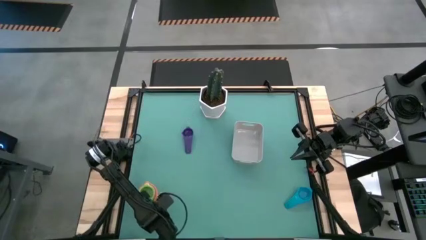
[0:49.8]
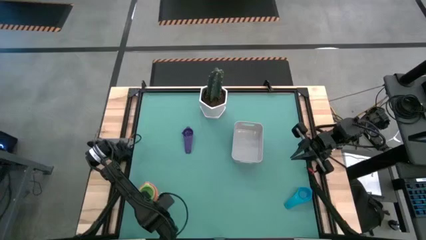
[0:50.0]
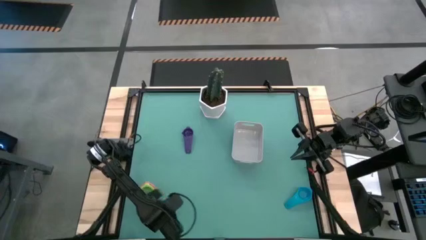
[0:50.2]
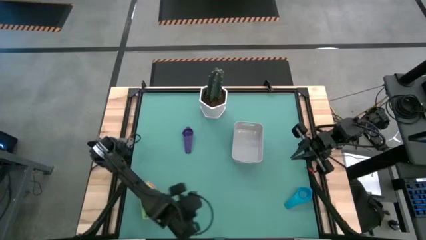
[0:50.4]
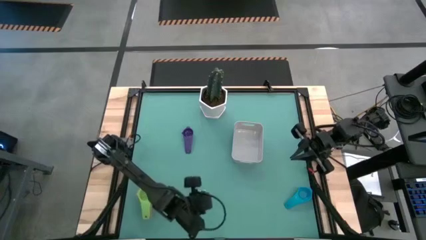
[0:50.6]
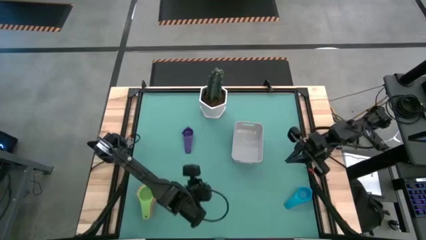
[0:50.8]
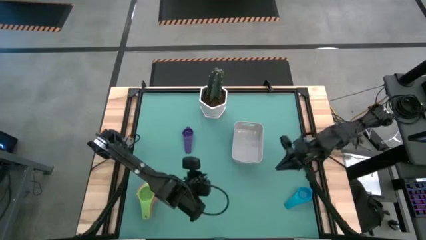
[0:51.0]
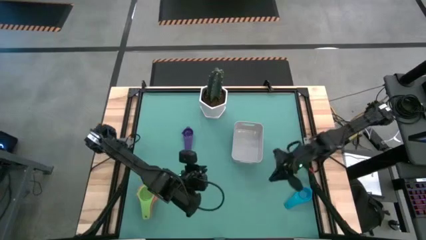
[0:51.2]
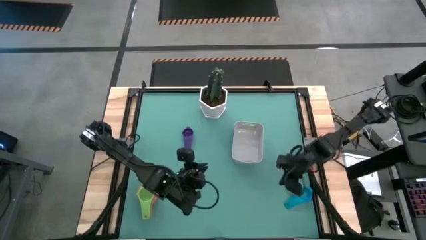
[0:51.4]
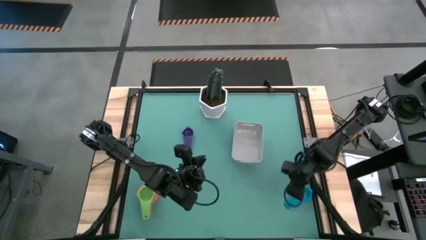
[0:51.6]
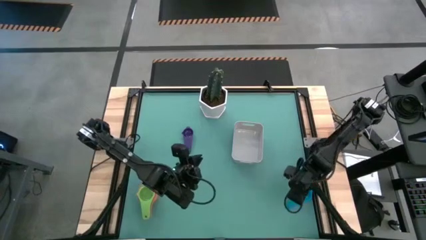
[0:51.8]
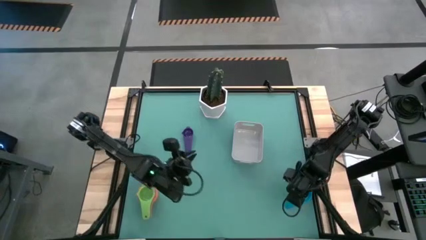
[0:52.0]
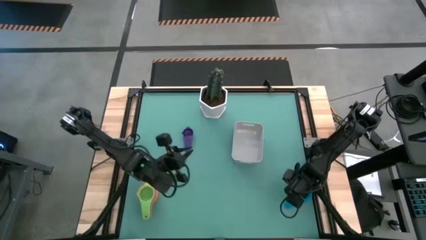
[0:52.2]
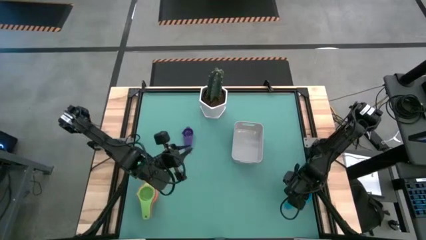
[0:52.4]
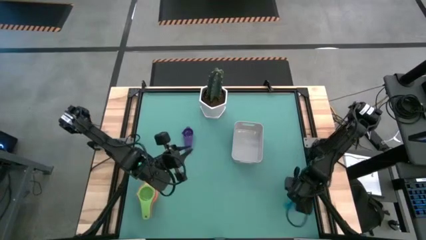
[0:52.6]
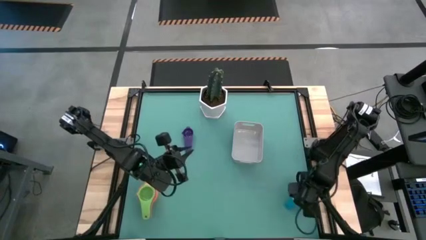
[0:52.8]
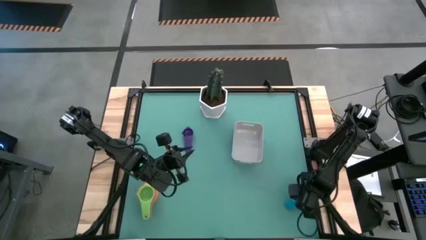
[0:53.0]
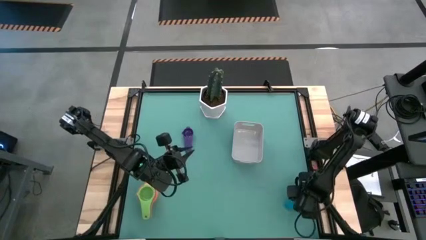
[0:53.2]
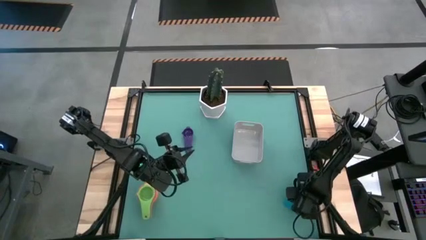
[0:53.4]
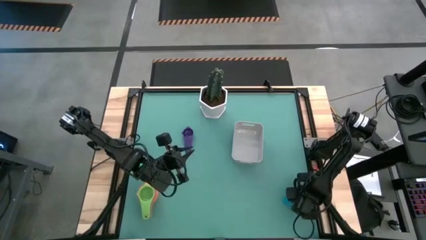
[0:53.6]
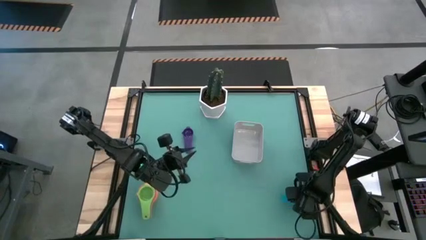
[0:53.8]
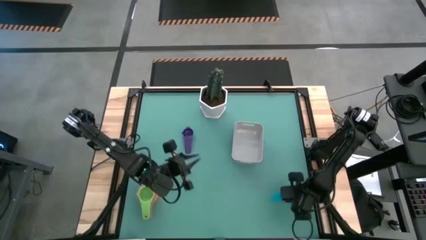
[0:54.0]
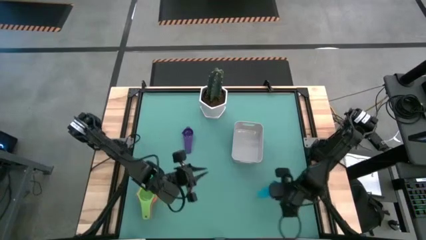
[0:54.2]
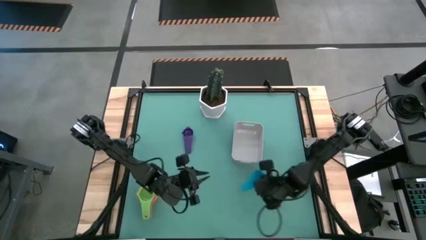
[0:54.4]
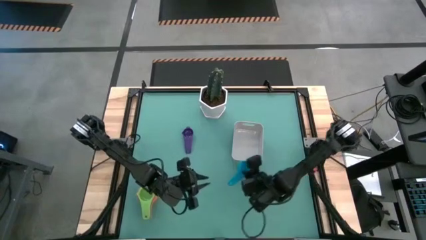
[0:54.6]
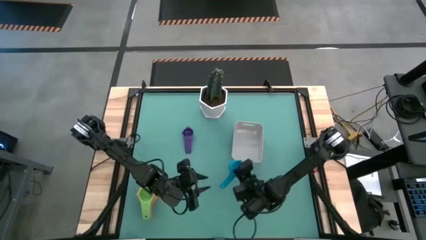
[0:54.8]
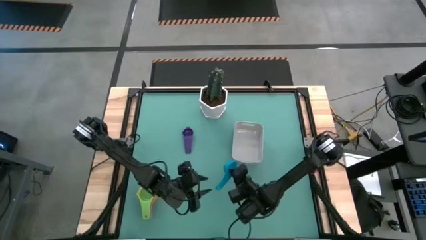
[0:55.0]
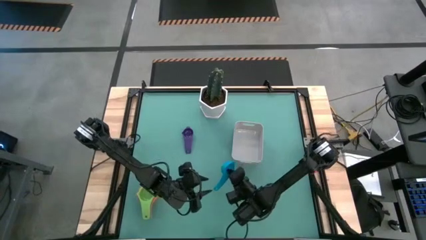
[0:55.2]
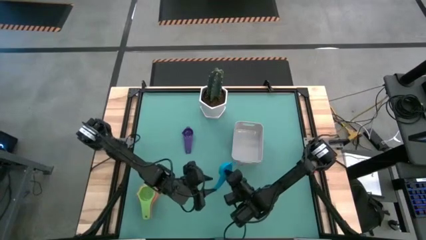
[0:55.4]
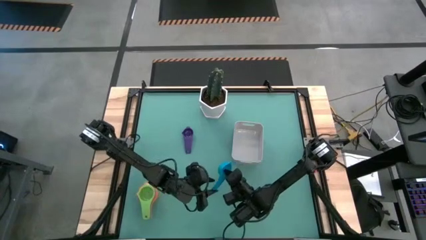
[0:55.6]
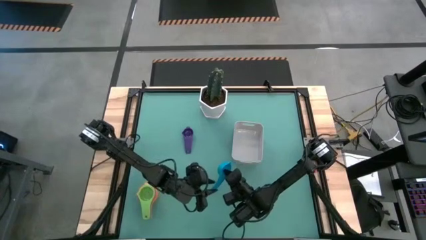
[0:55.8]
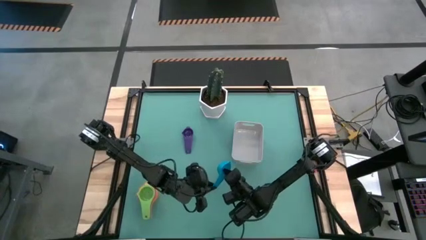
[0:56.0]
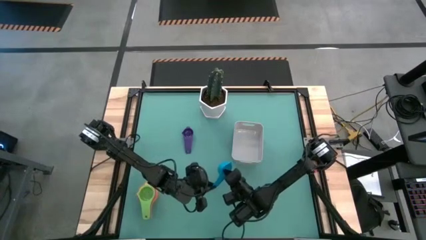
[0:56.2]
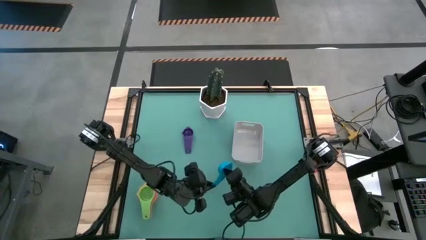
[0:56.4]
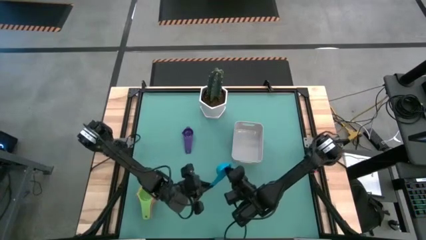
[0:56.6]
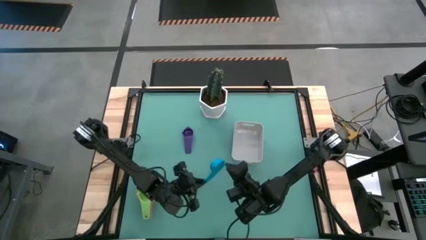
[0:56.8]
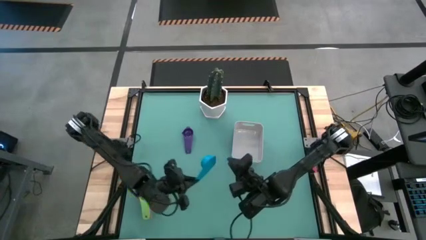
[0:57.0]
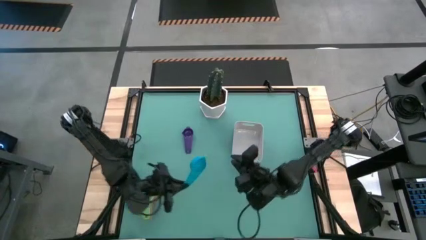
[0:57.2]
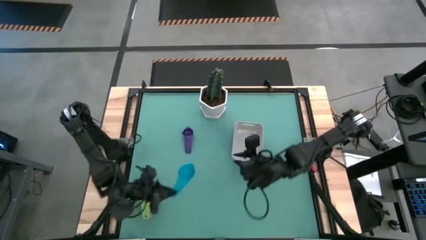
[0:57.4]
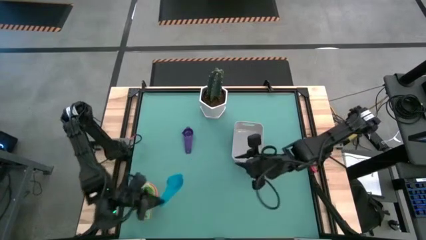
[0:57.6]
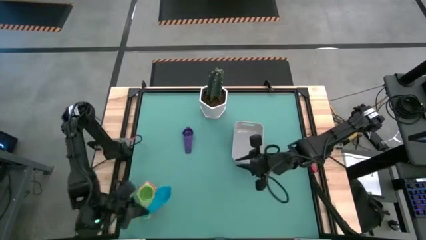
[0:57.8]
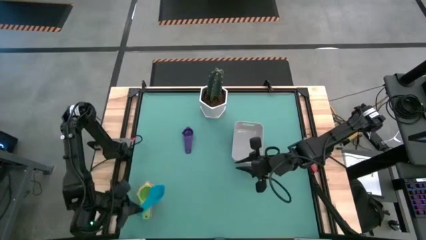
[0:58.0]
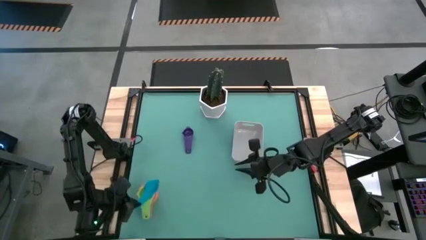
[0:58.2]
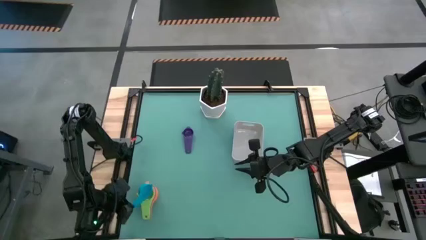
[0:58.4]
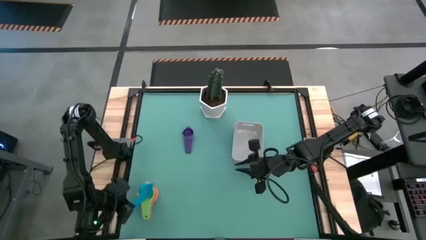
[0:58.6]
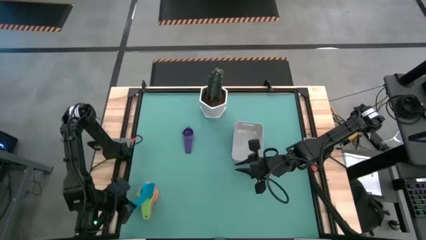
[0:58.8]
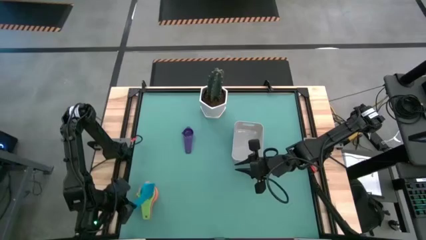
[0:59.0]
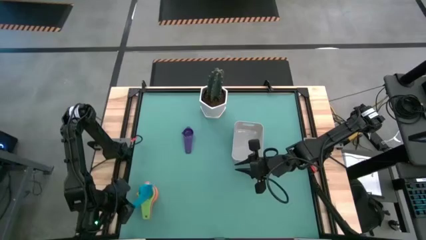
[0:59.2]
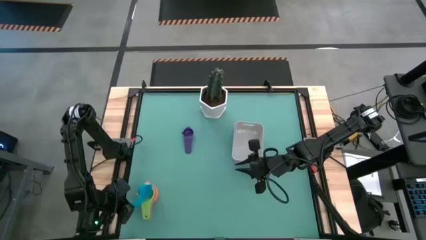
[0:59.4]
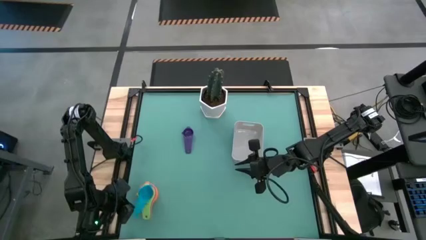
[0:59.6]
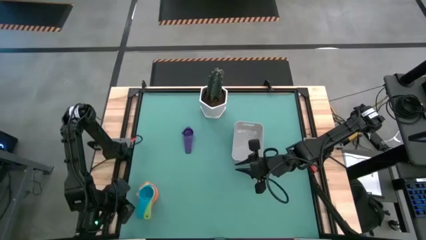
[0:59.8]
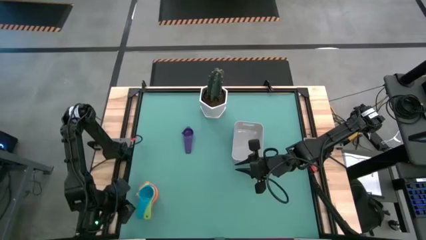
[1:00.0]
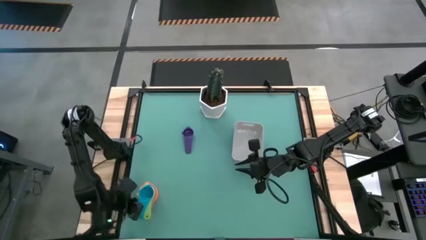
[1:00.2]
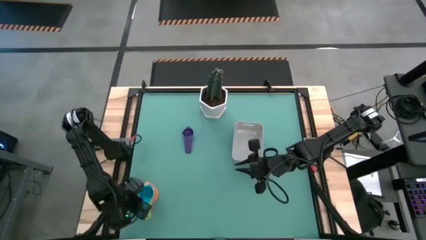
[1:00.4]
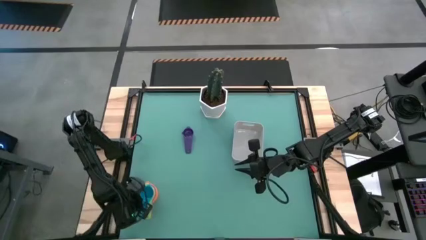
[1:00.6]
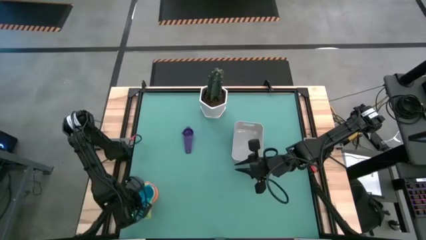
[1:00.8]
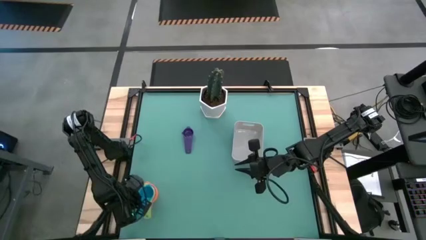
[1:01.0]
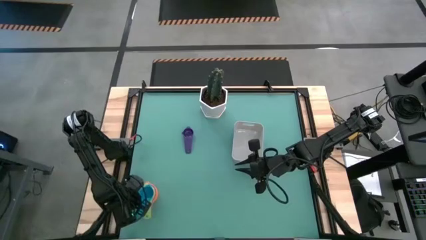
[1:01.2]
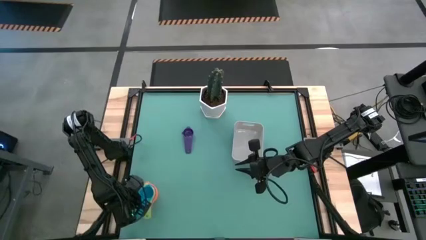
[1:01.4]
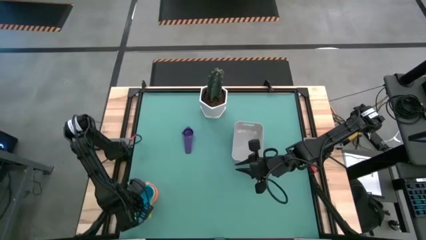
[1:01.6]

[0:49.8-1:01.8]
Task: Nest measuring cups in basket
Stack the light blue measuring cup on the top of the green measuring cup

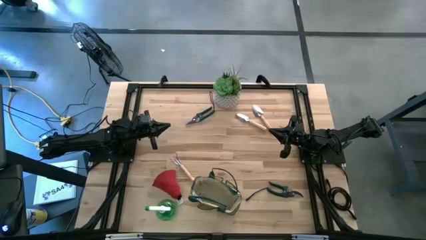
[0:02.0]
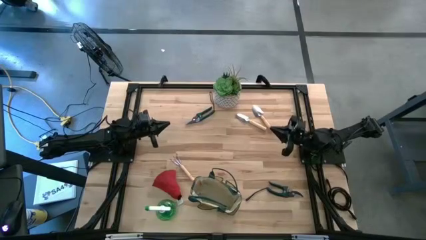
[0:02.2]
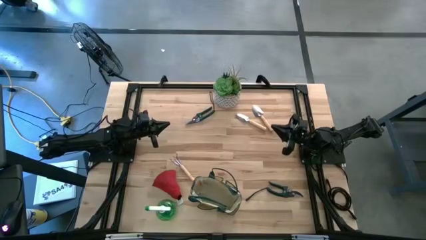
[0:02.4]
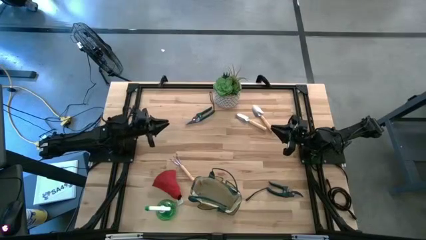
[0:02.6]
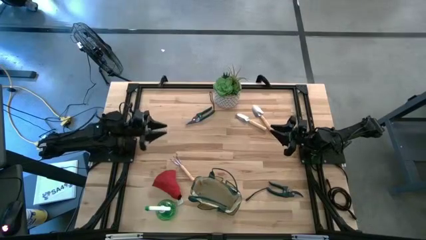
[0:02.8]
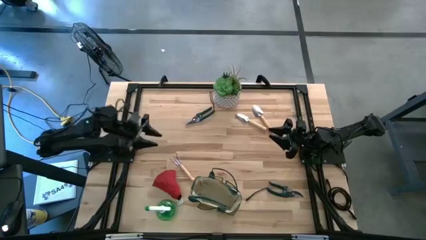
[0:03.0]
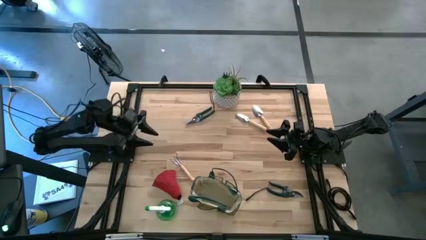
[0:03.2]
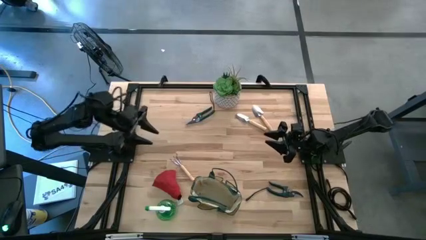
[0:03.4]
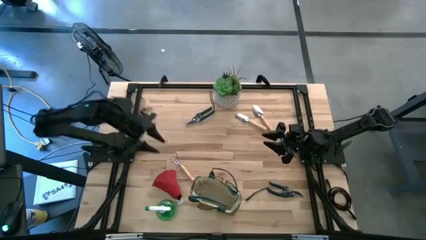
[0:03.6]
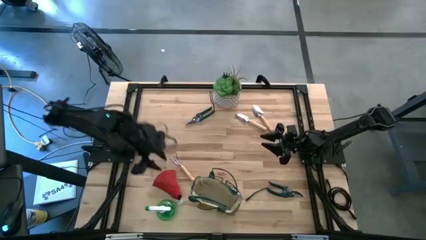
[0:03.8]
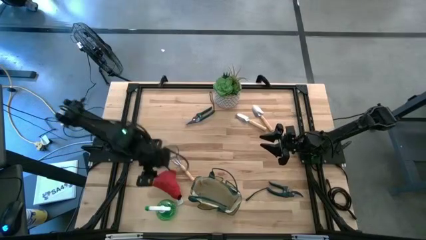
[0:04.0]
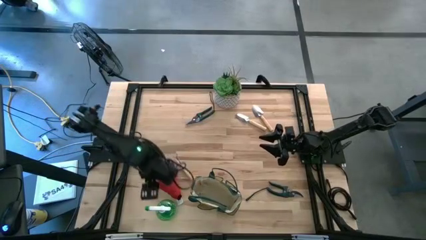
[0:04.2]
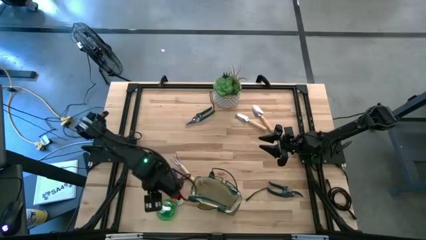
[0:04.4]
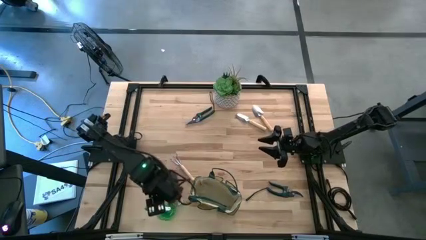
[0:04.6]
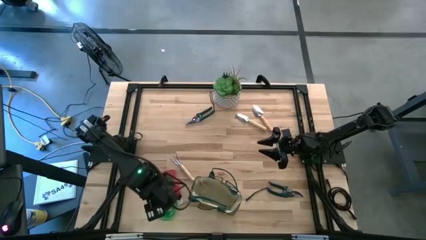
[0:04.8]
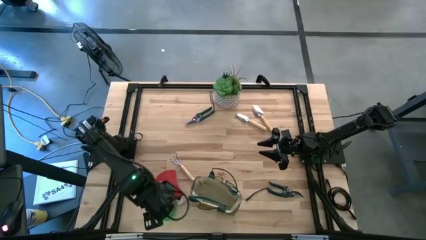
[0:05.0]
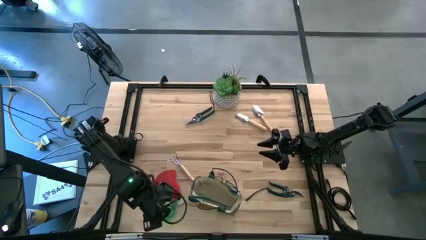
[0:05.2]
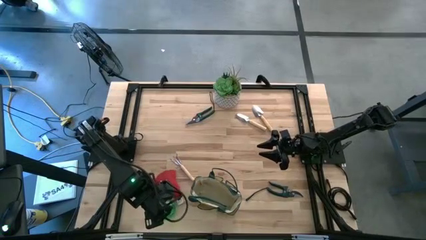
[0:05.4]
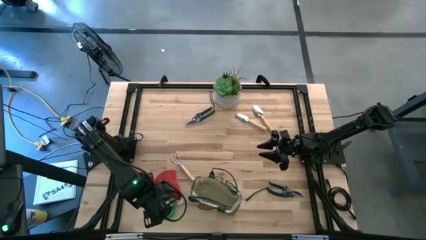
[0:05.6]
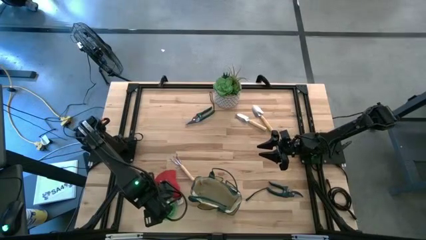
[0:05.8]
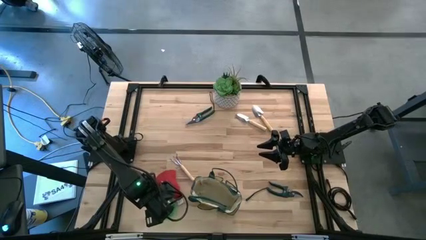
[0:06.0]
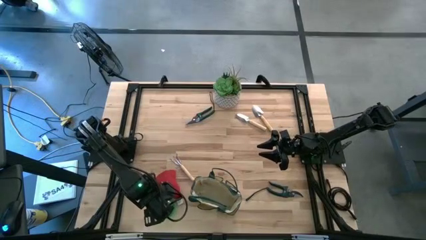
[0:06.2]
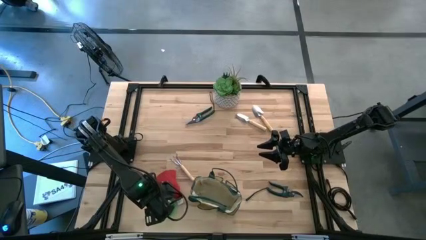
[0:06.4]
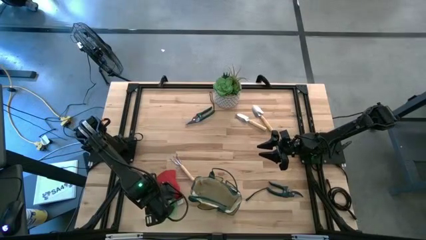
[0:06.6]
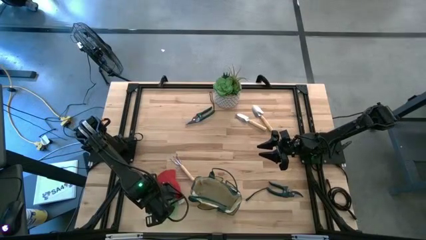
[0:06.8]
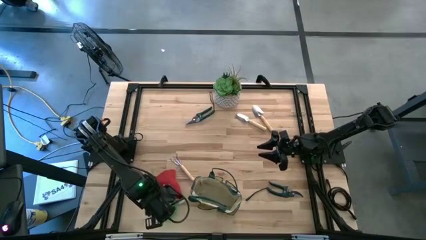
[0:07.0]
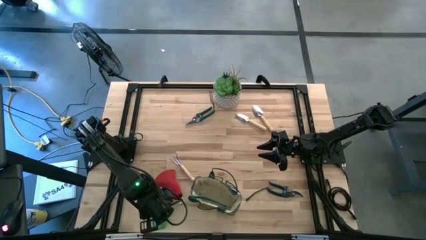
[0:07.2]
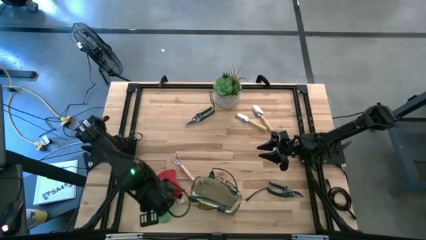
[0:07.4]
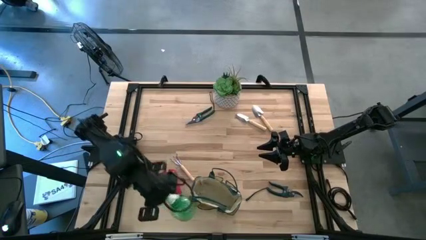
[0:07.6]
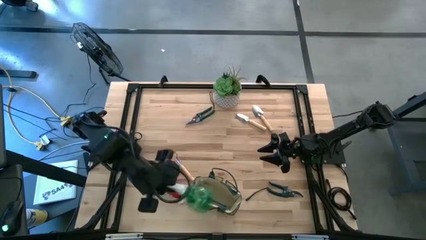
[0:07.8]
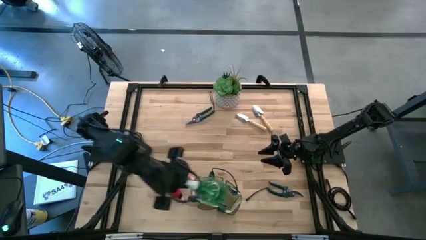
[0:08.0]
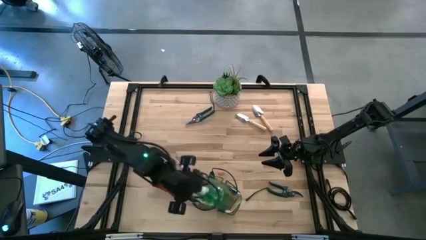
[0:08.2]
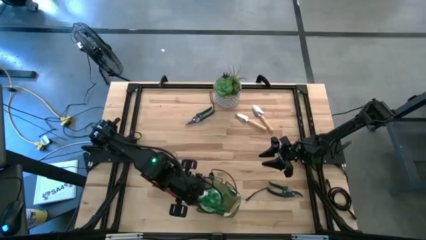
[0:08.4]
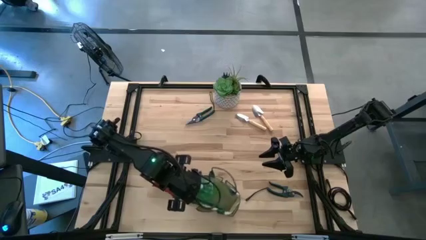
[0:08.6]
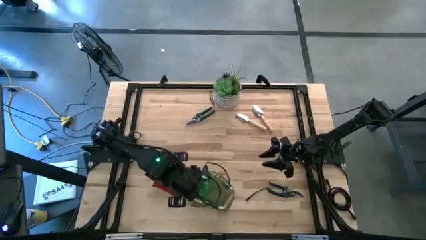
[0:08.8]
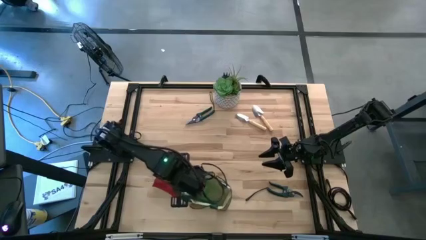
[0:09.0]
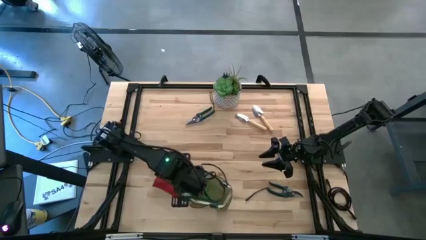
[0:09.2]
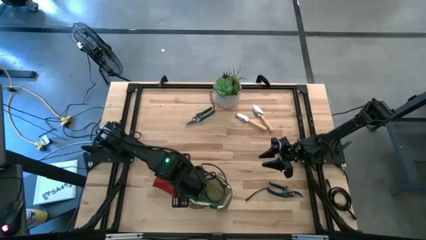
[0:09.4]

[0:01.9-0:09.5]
Task: Pick & Place Garden tools in Gardening bag
Put the green spray bottle into the green gardening bag
